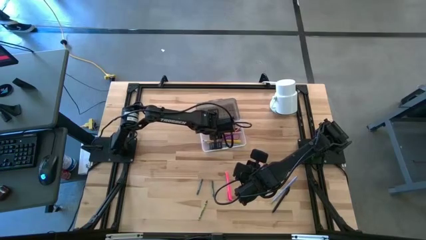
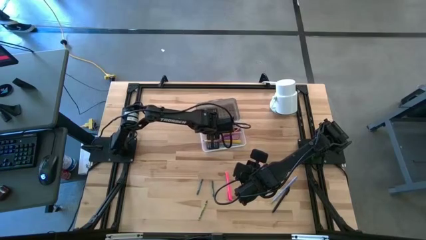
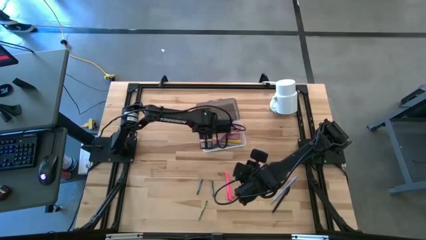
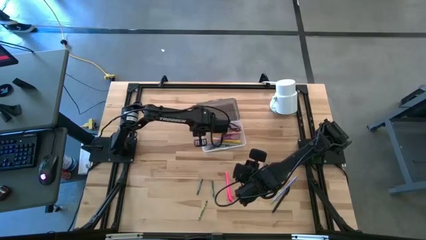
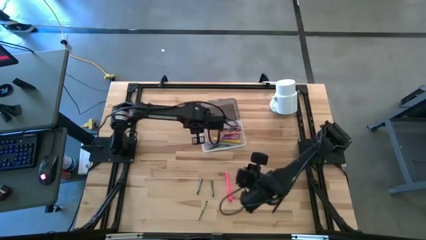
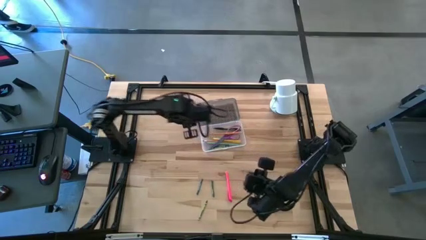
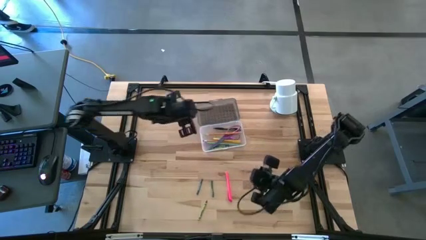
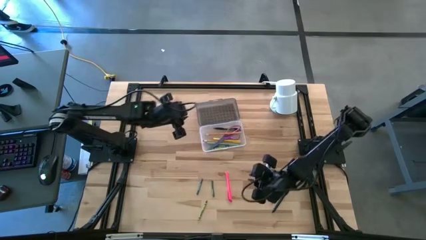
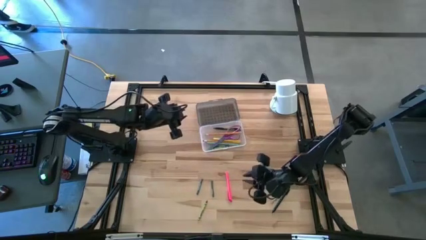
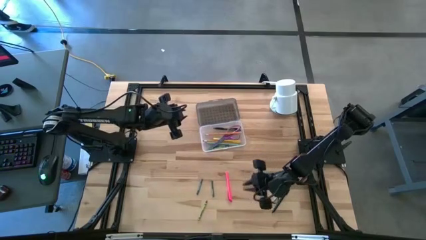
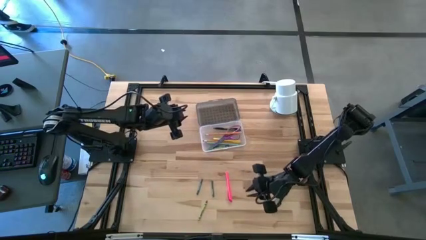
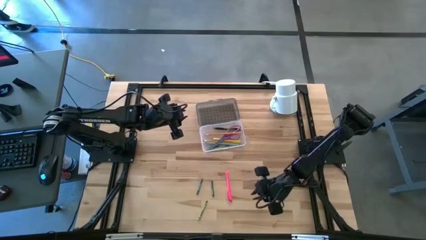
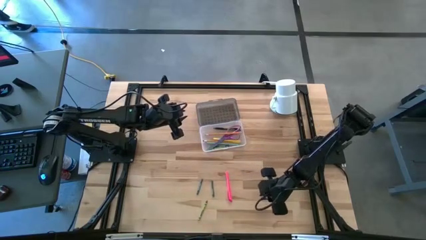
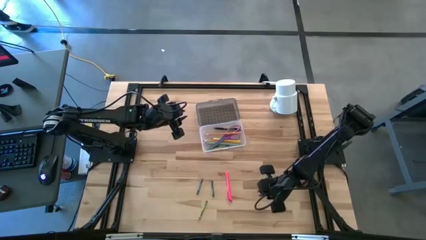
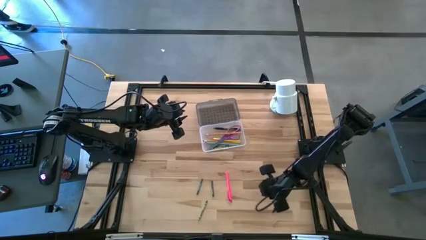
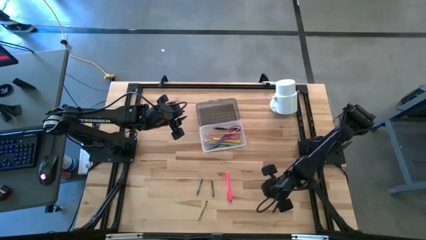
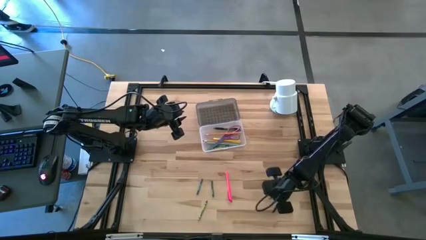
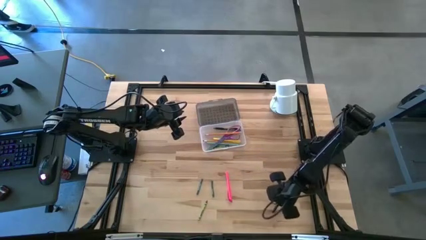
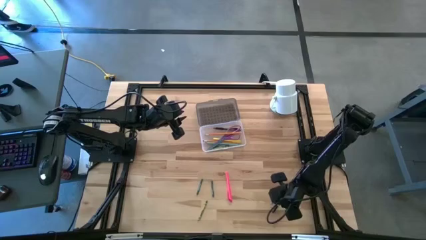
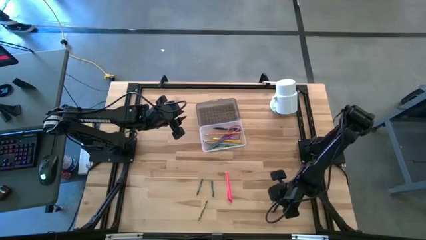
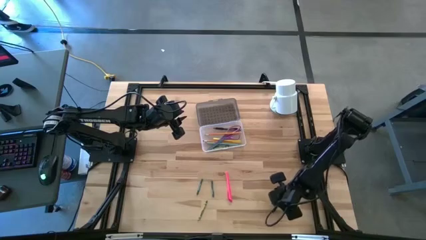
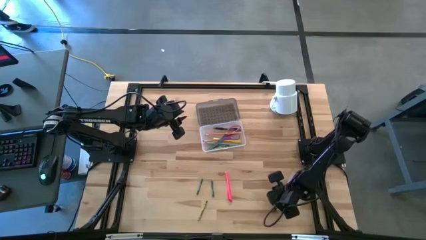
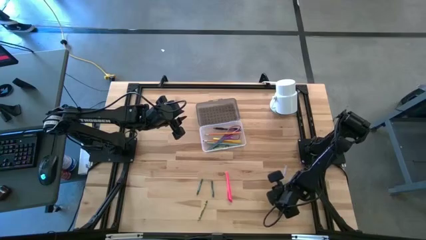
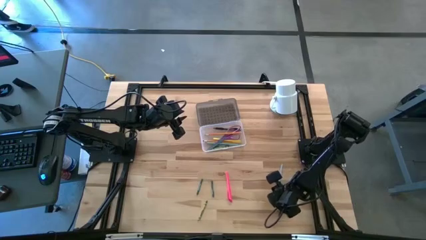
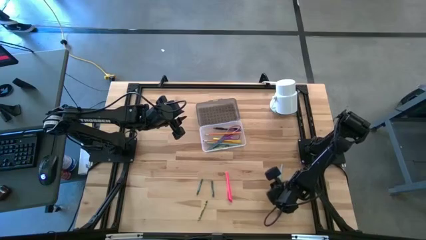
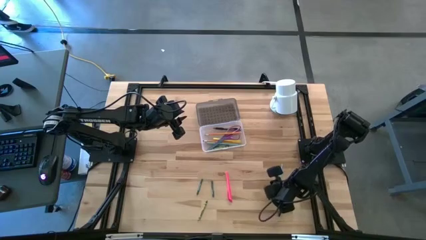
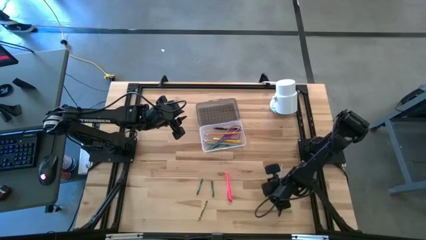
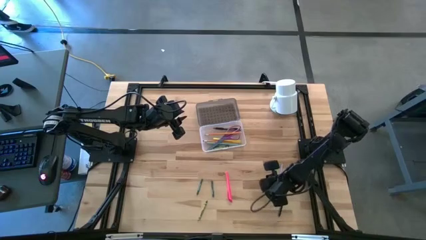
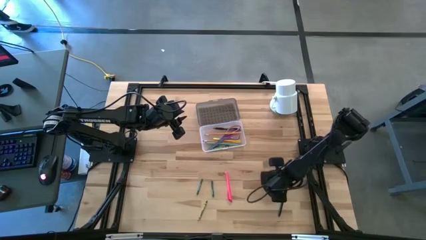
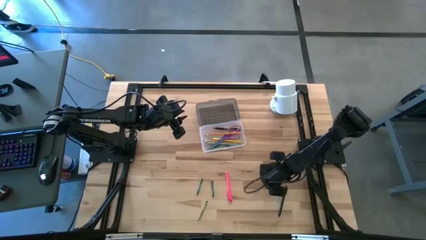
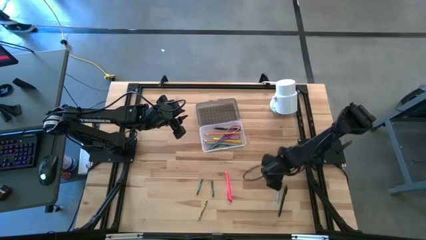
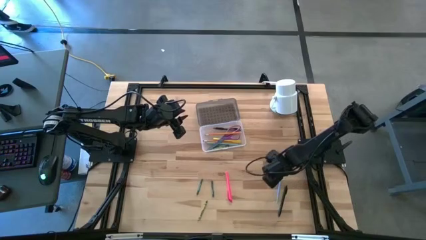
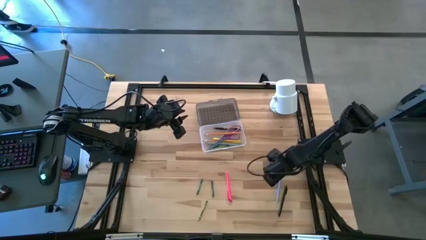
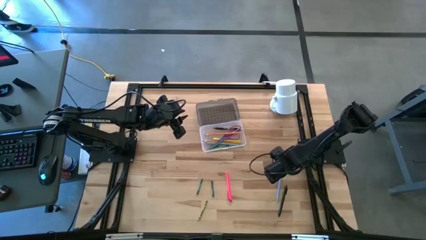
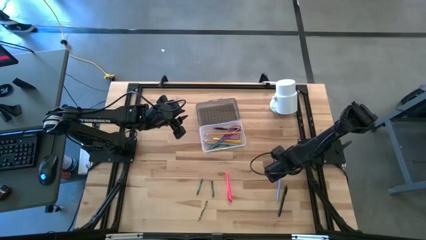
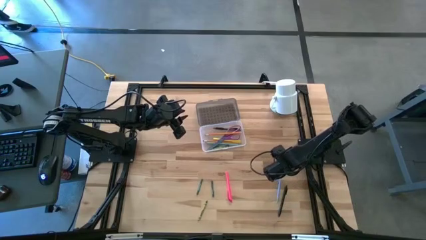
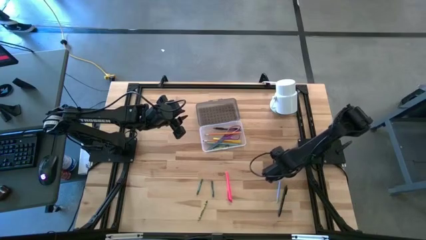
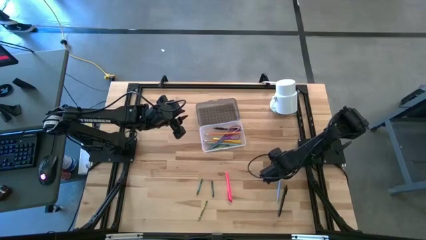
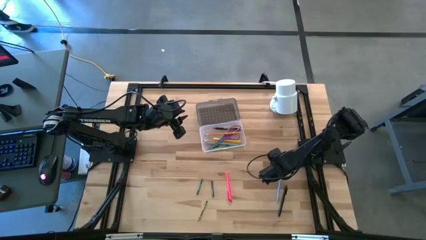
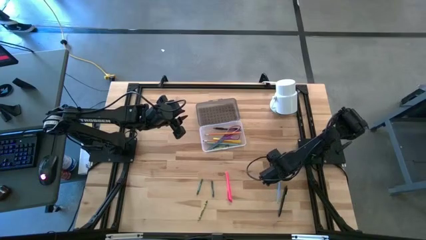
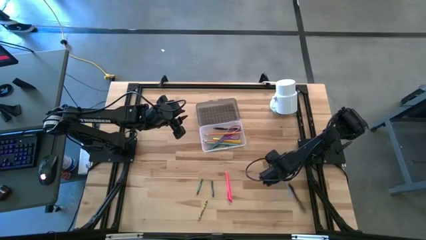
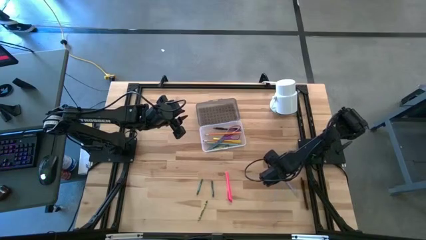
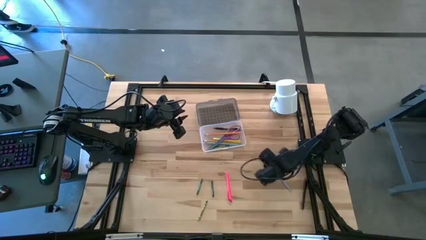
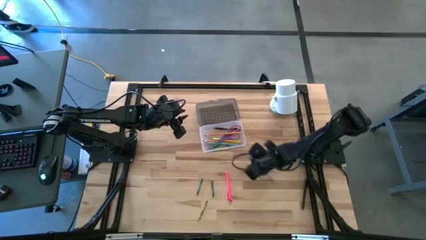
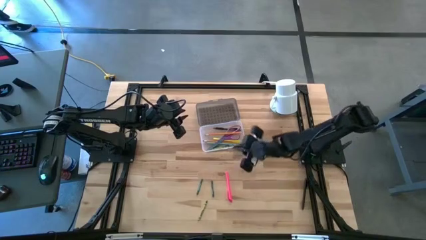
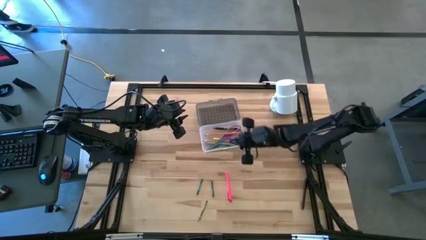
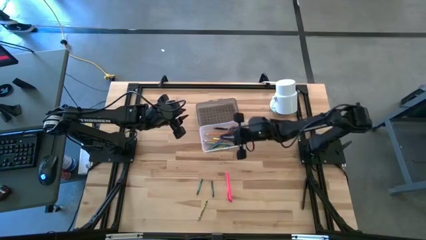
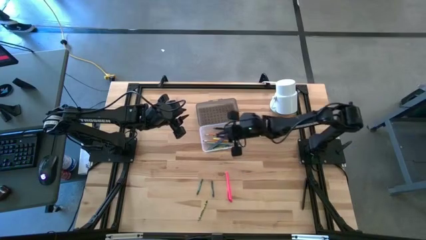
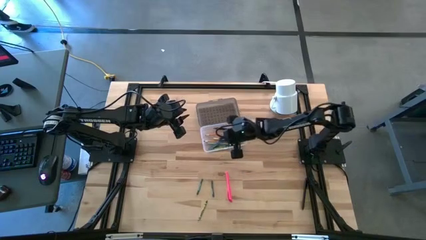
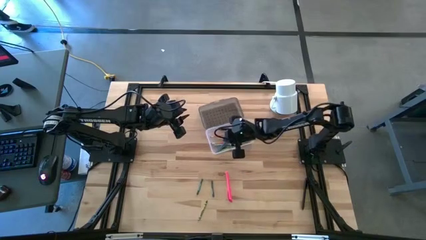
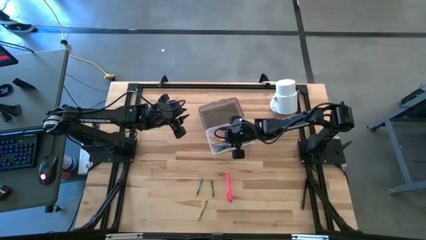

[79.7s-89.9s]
Task: Pick & place school supplies into a supply box
Put the blue pencil into the gray supply box

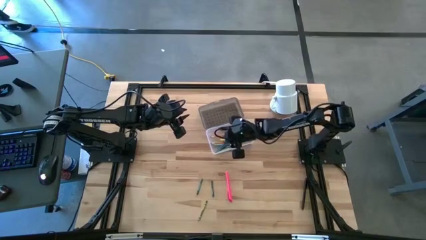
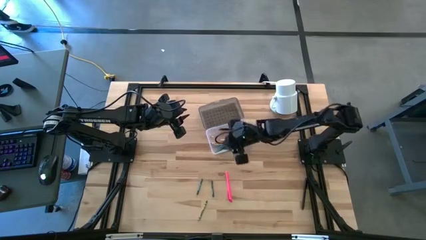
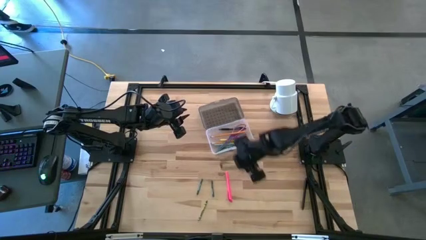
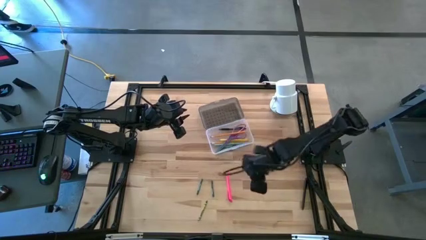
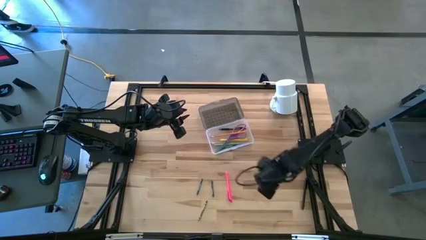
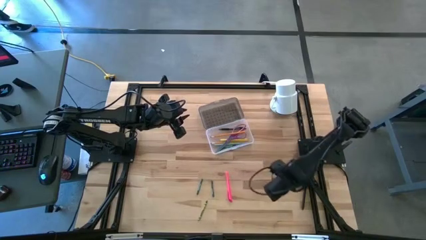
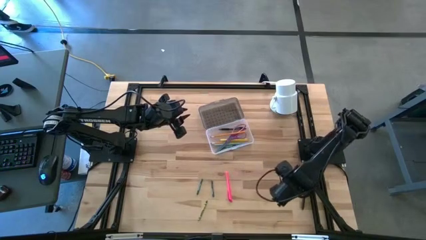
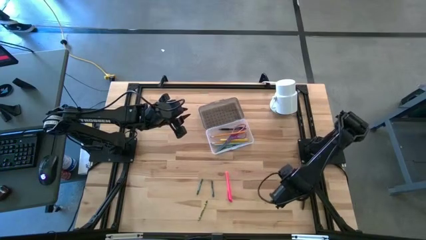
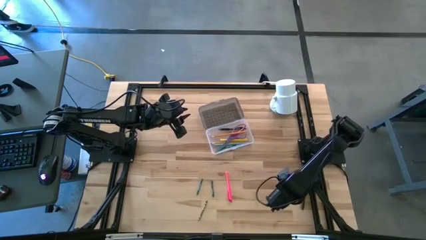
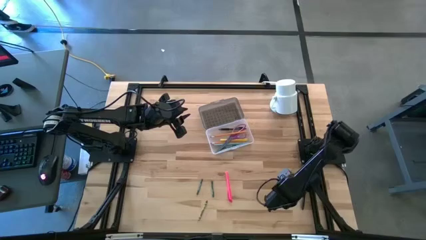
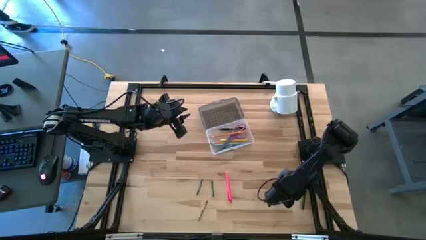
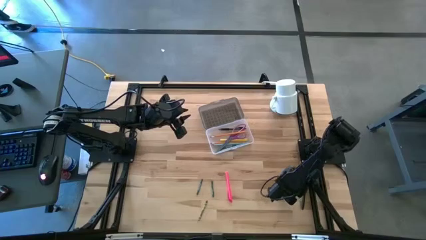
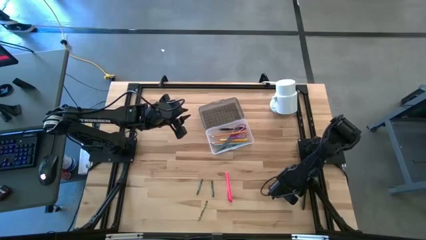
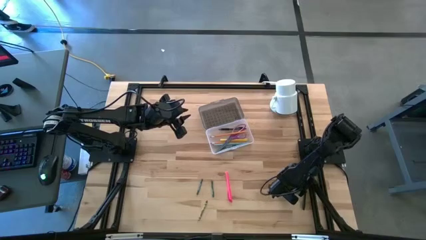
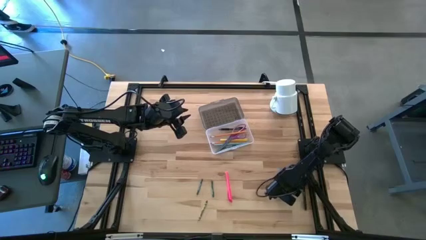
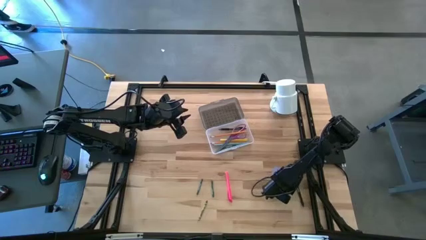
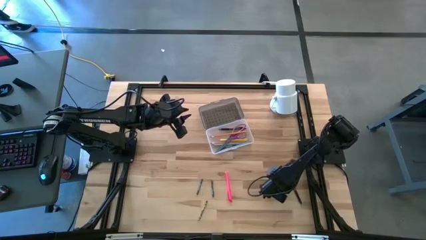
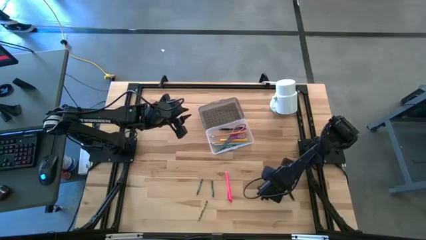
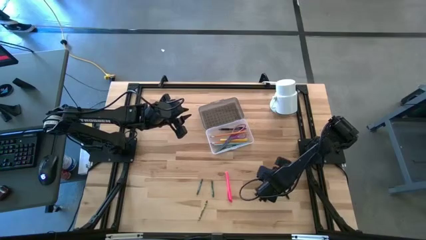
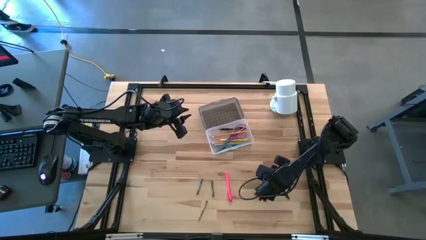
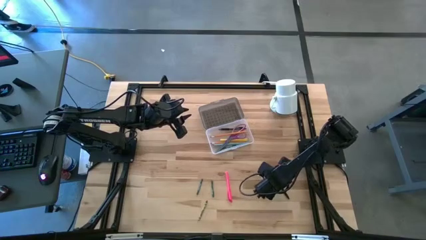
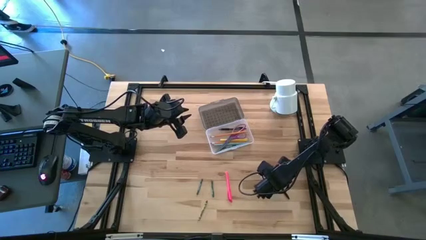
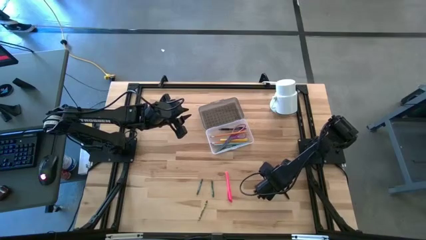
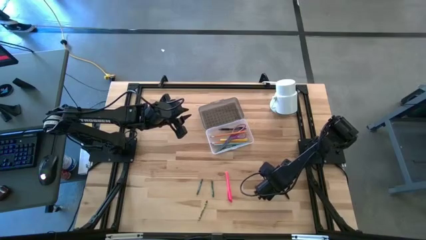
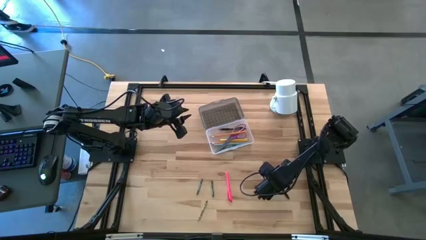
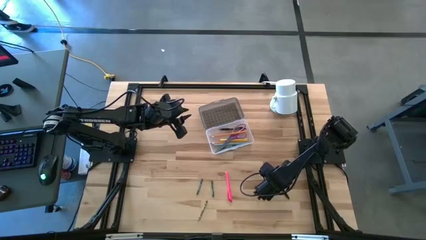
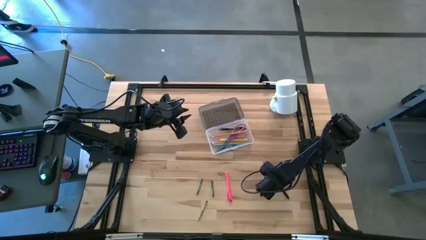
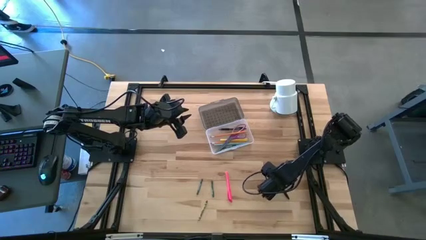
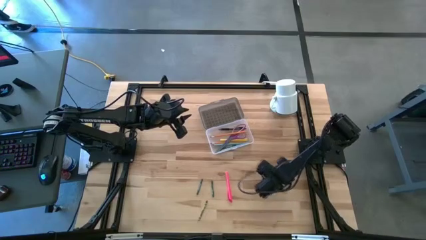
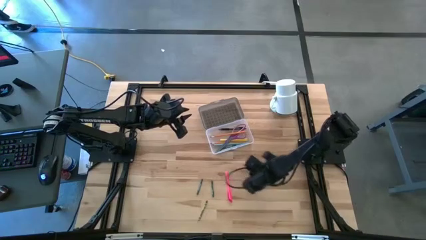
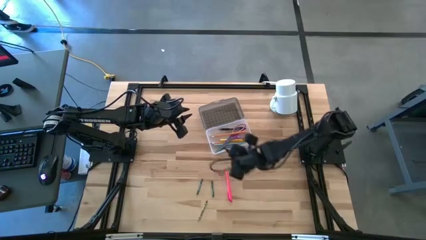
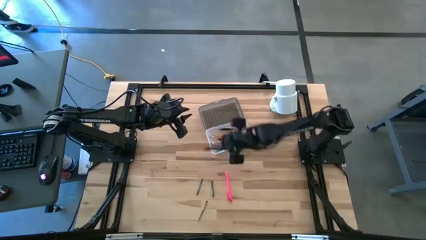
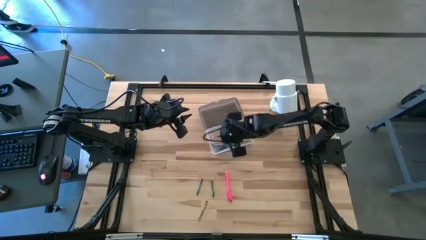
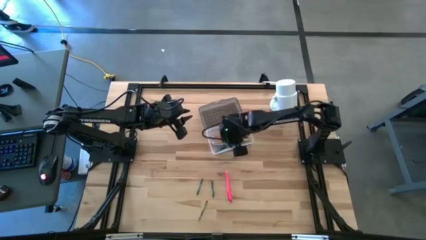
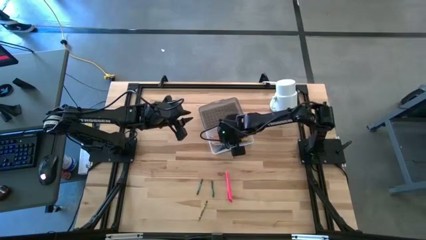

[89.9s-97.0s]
Put the black pen into the gray supply box
